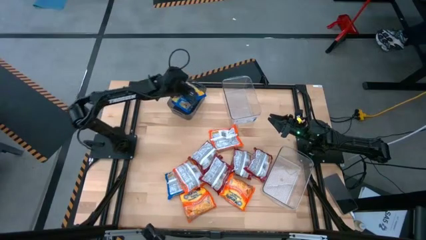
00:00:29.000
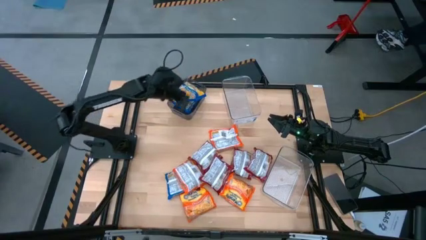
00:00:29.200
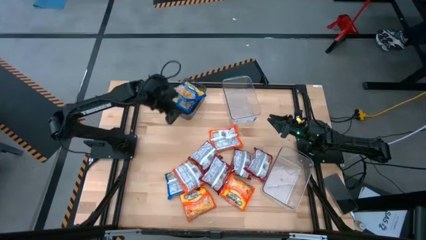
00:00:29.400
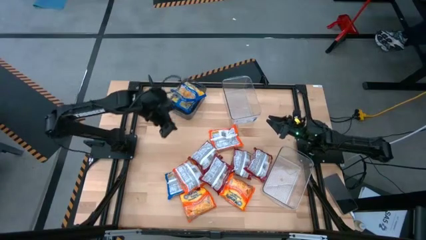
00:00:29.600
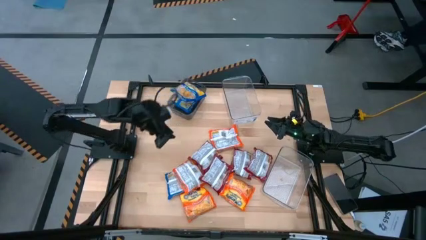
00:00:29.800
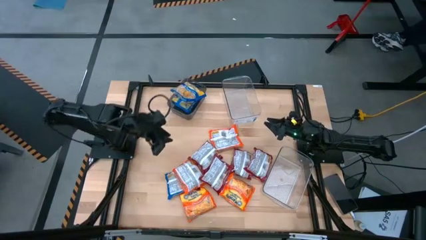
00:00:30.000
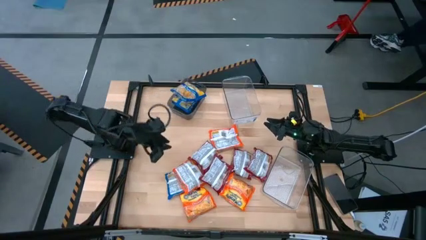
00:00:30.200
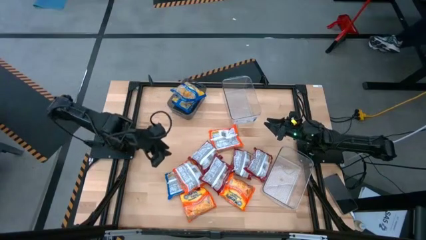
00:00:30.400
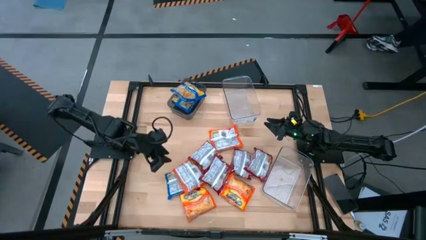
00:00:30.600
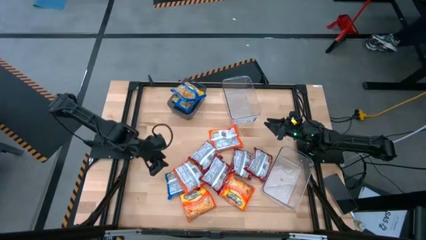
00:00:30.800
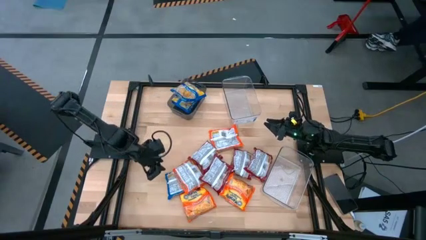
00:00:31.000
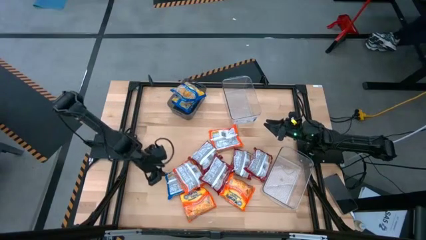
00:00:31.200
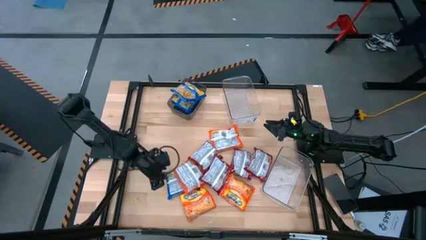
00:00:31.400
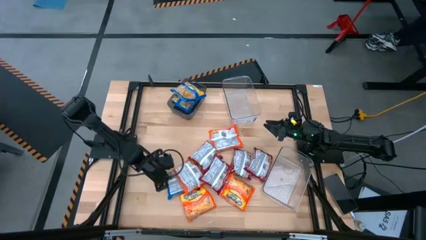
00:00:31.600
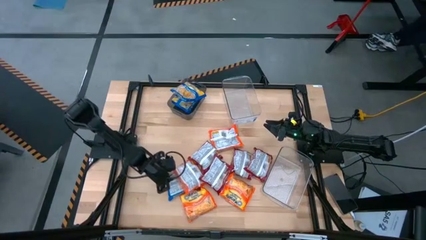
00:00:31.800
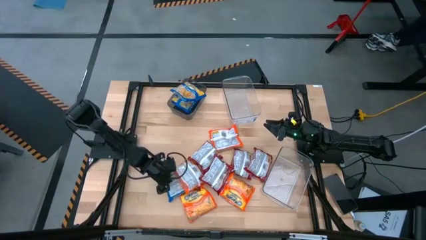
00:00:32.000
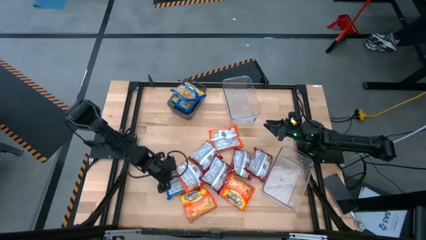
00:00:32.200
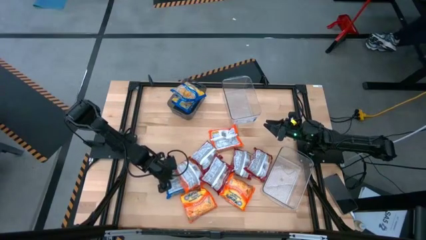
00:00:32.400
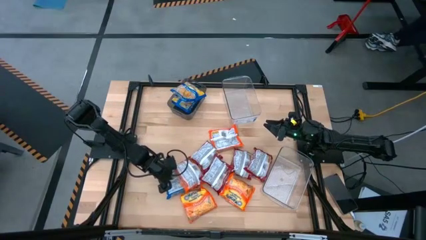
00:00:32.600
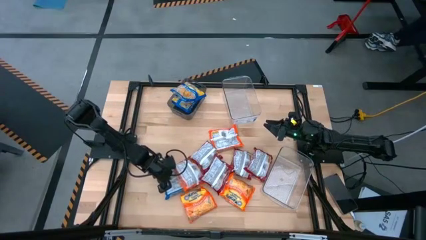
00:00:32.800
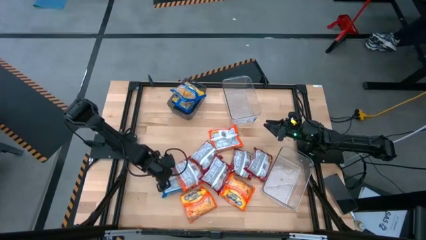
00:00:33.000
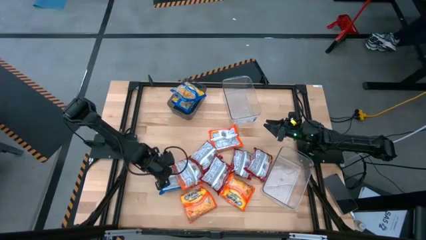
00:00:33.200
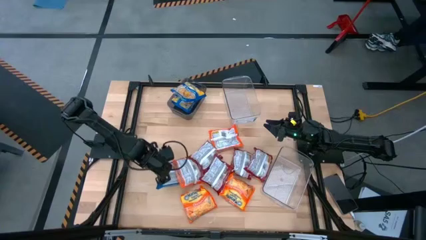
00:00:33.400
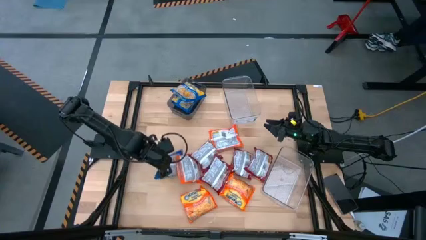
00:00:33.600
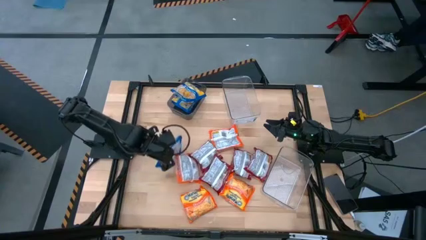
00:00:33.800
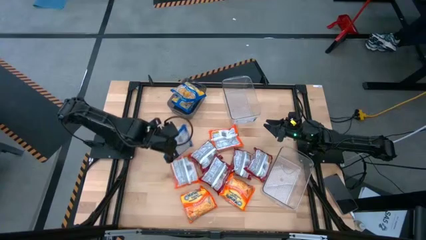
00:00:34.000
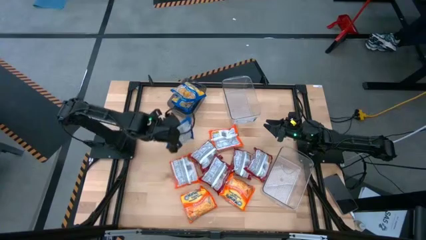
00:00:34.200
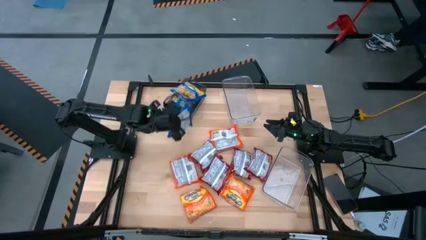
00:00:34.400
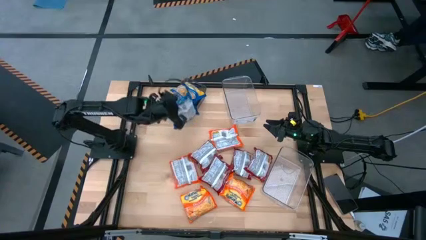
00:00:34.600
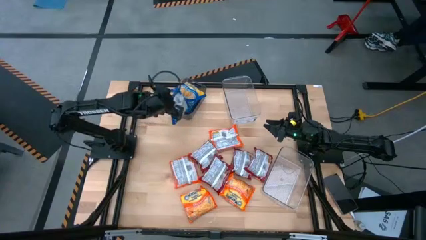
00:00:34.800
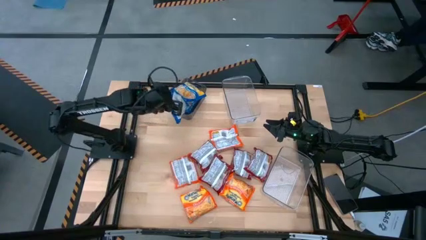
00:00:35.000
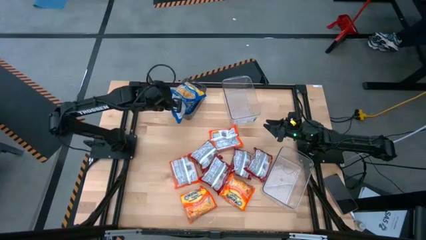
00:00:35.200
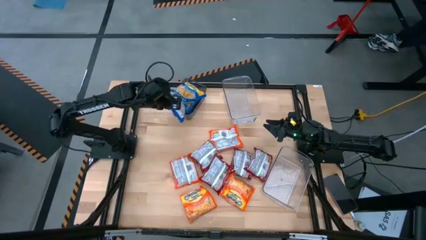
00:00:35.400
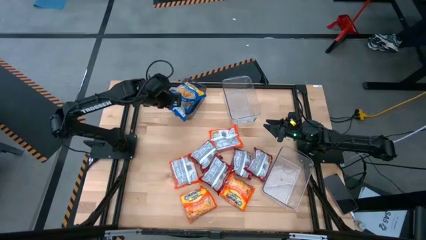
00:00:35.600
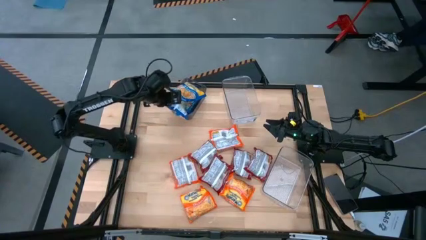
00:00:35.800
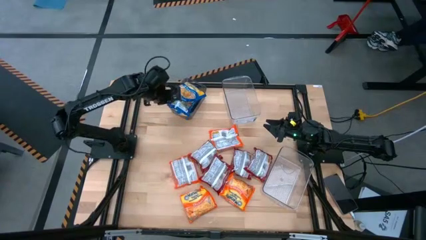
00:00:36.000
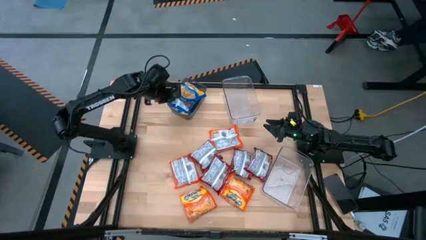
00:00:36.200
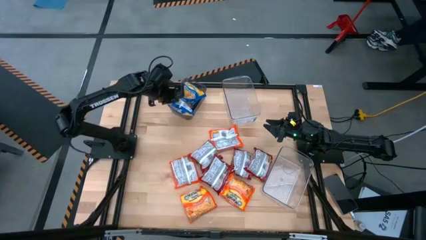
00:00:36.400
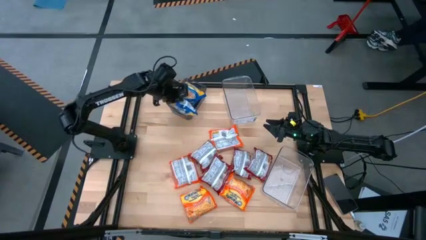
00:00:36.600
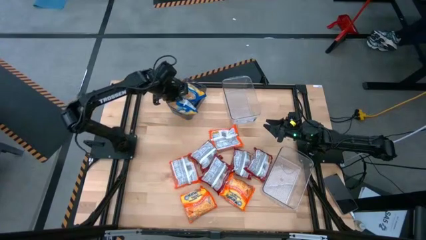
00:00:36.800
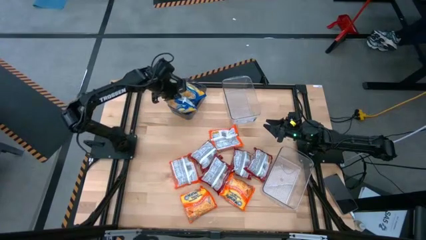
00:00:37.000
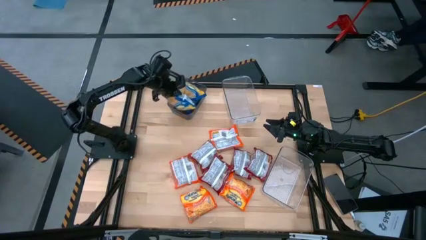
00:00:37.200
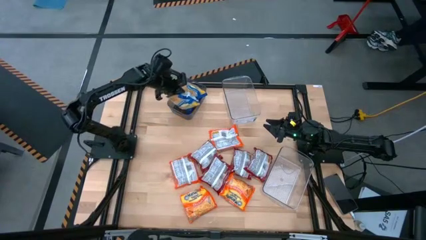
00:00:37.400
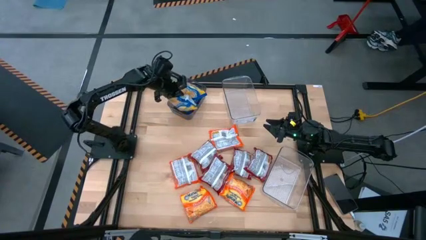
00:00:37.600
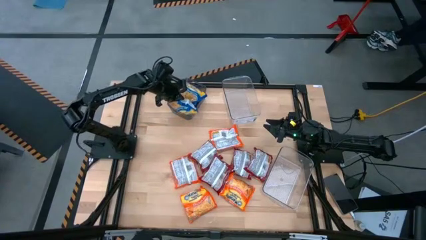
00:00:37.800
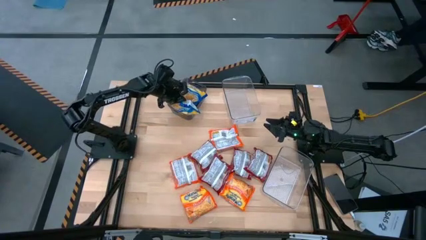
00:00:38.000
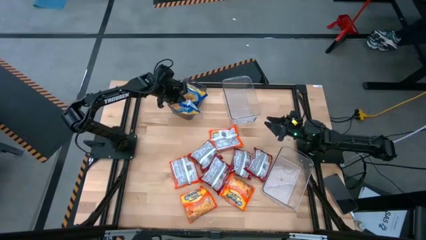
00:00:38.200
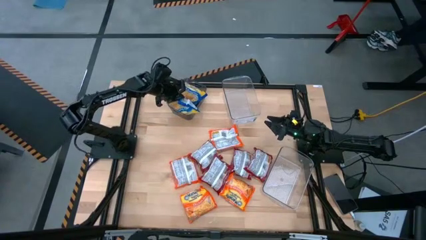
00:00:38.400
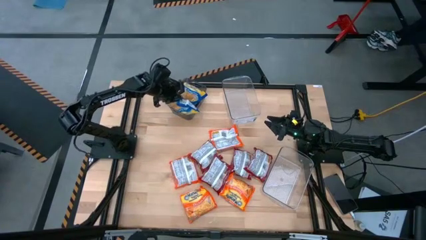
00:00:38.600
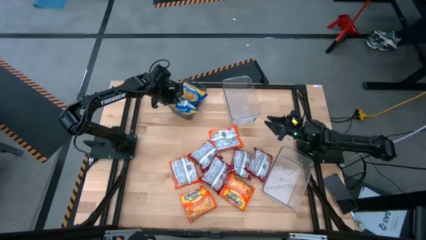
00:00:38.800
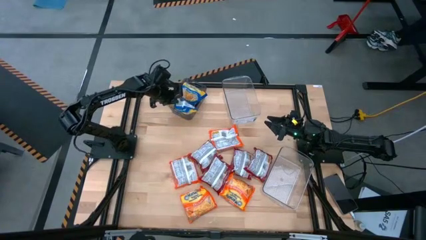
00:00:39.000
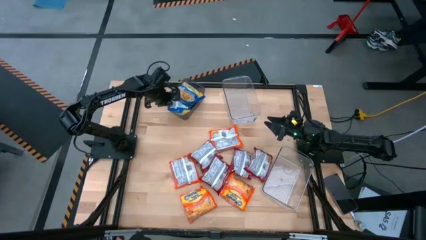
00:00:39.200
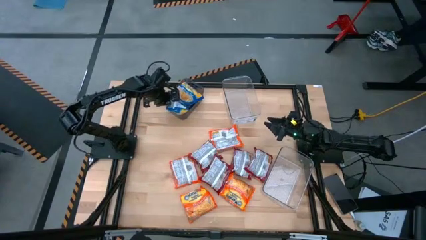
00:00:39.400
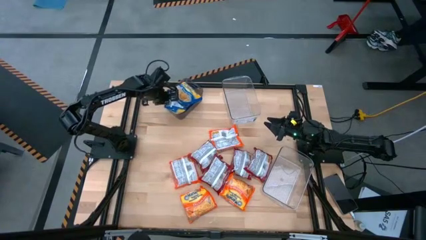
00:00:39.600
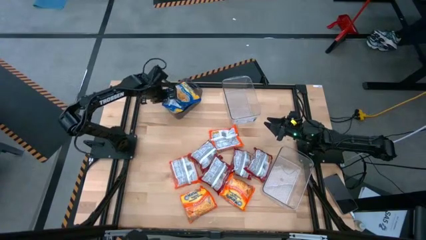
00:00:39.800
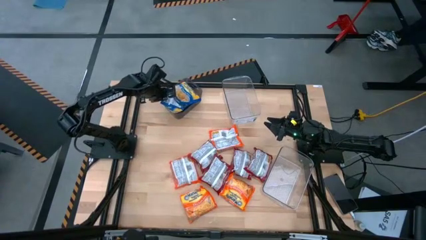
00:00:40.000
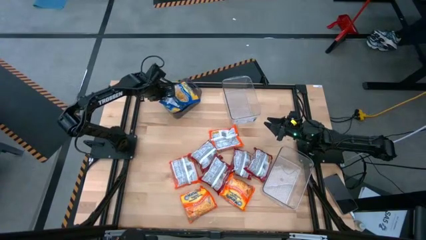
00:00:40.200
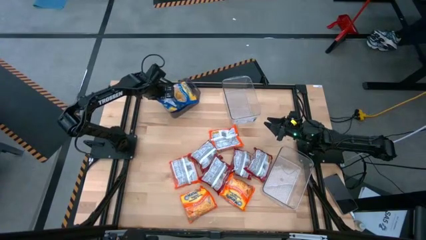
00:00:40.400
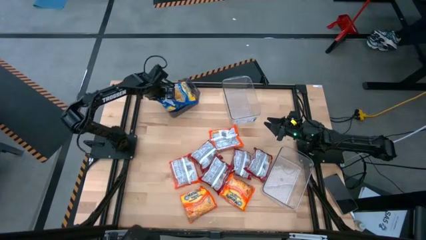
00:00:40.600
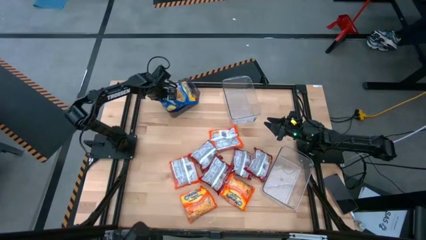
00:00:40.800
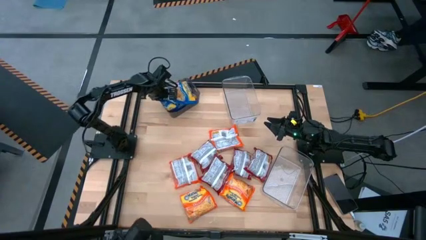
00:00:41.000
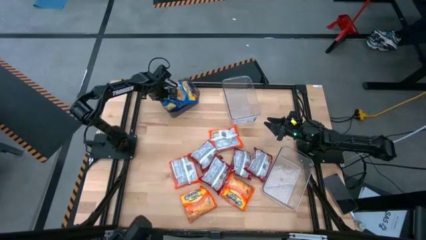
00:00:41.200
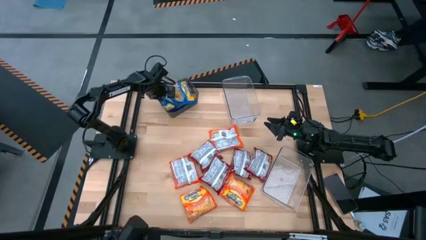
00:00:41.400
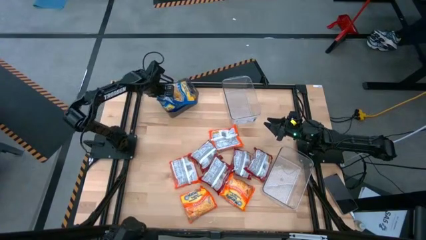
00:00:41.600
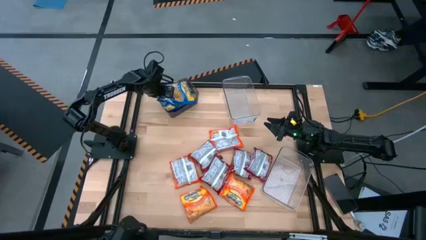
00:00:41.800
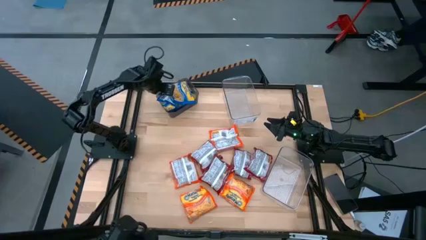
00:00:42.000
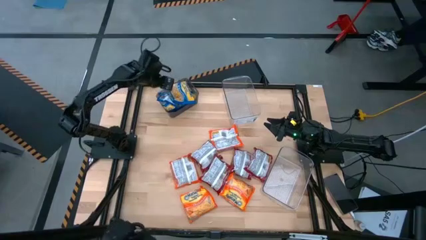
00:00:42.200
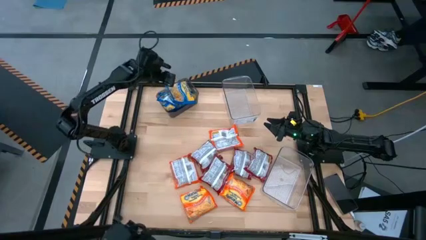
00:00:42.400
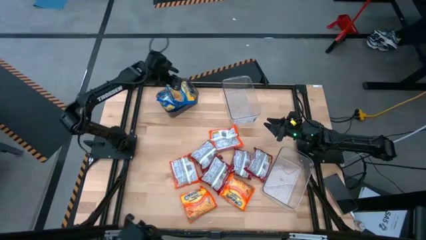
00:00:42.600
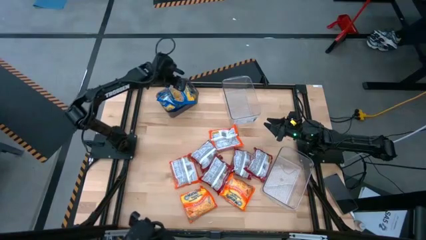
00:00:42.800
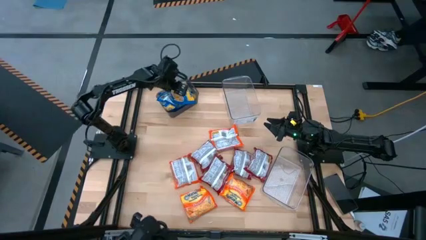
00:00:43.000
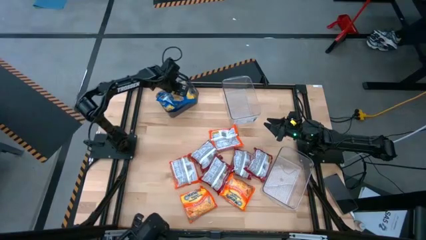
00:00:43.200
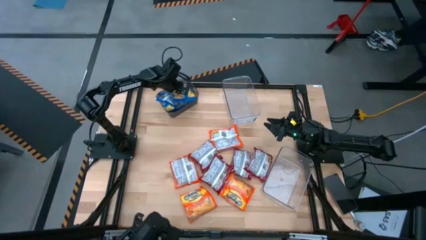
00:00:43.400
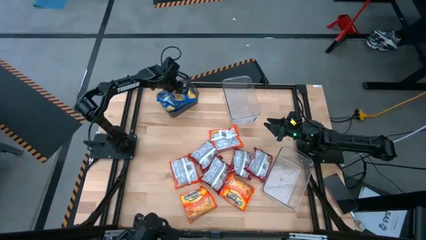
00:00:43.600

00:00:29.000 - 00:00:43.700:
Task: Sort Maruchan noodles
Put the blue noodle pack into the black bin
